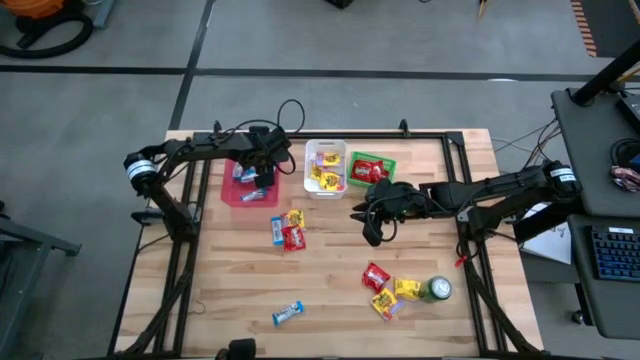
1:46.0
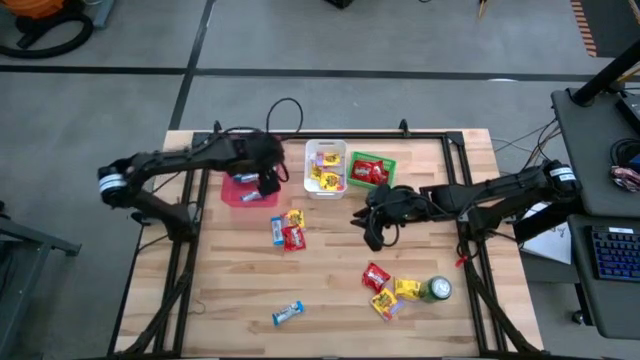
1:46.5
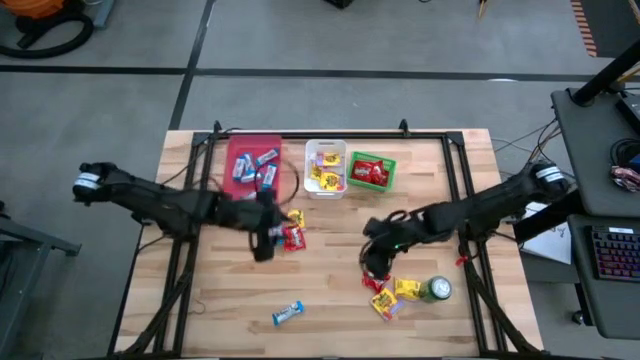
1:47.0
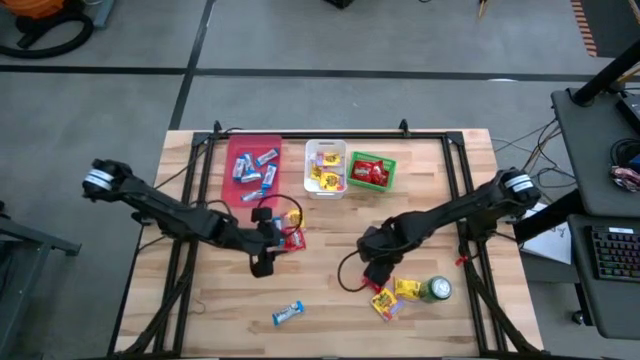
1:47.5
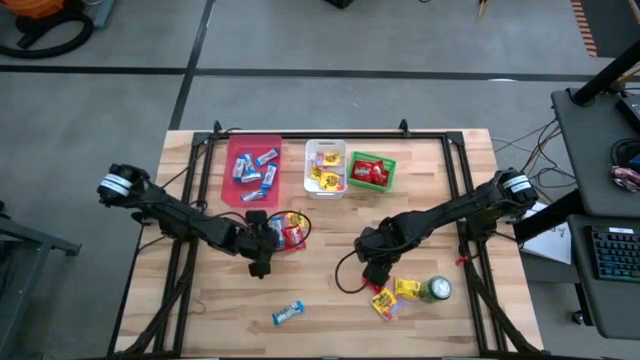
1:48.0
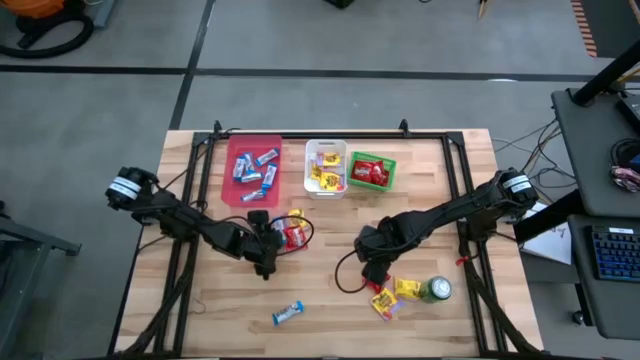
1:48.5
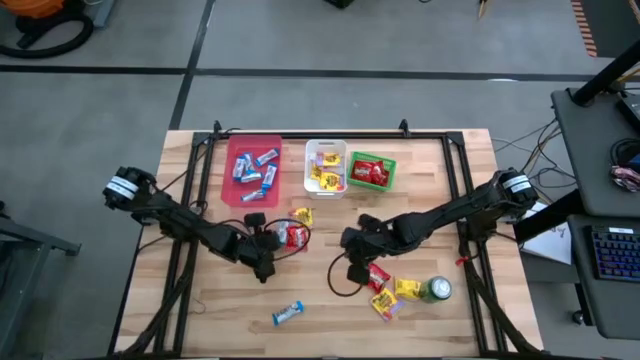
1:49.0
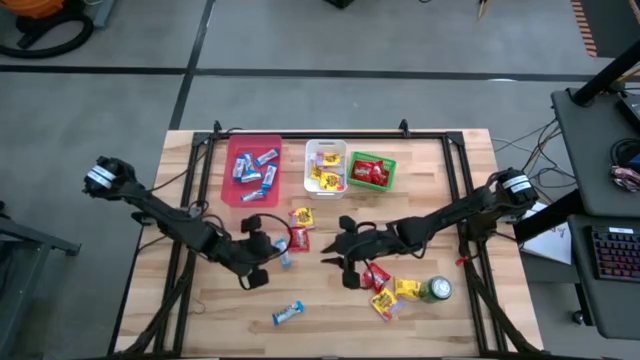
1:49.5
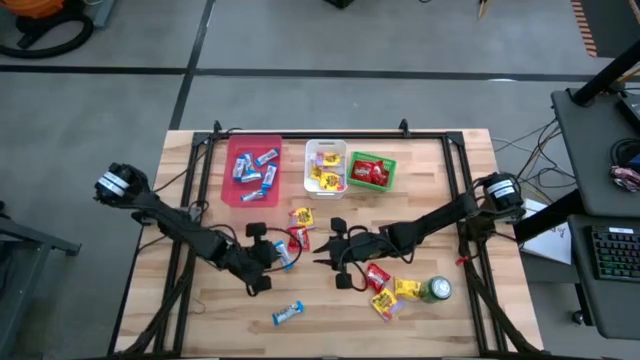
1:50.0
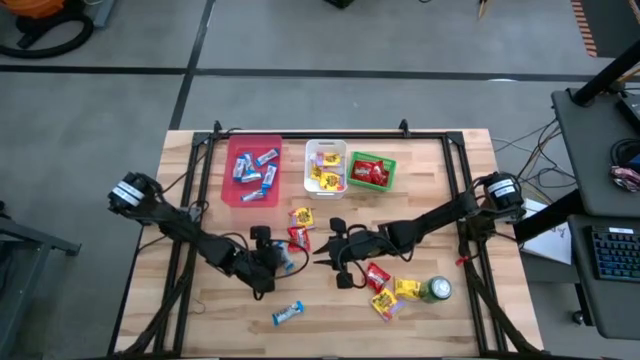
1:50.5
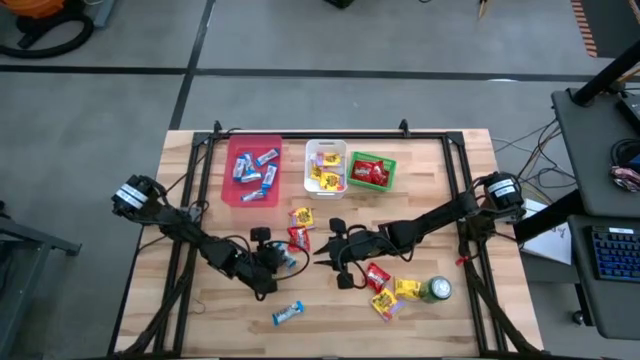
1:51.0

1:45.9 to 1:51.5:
Task: Sort candy
Put the white chocolate into the pink bin

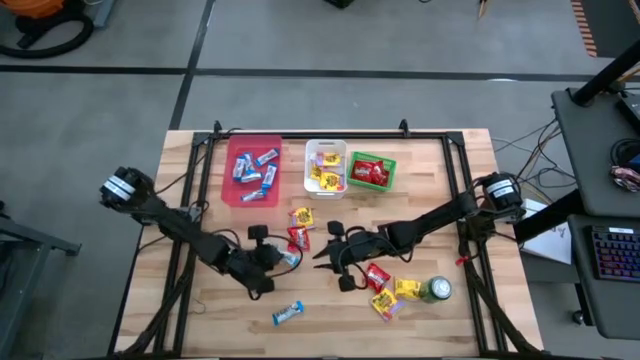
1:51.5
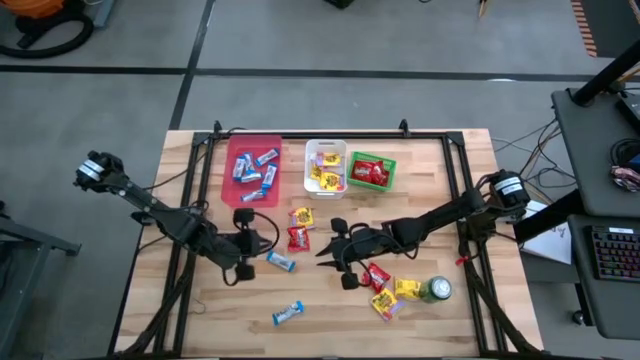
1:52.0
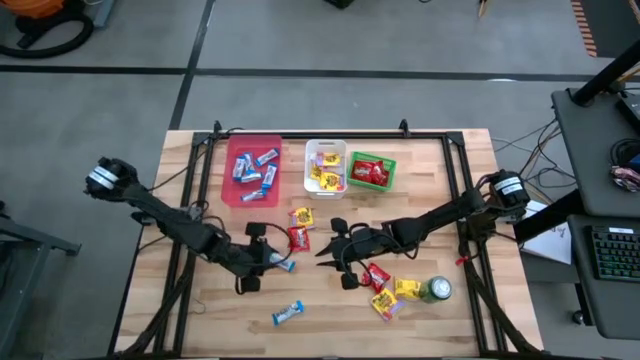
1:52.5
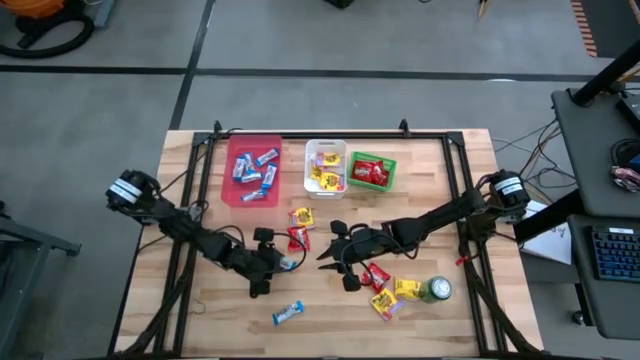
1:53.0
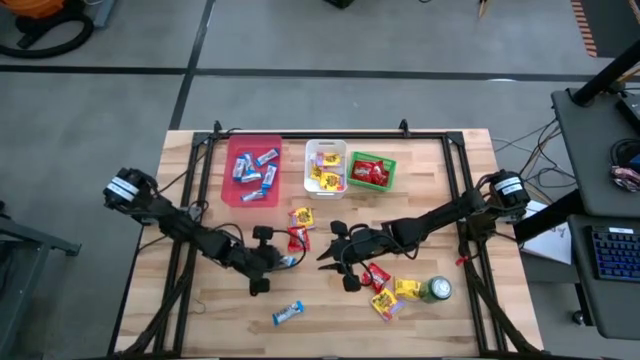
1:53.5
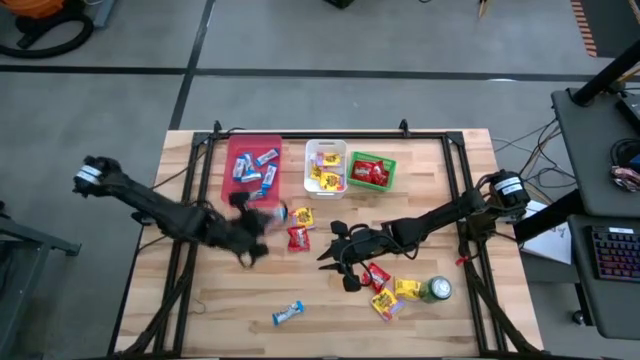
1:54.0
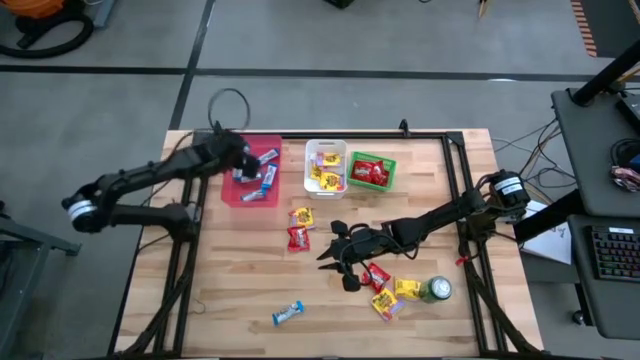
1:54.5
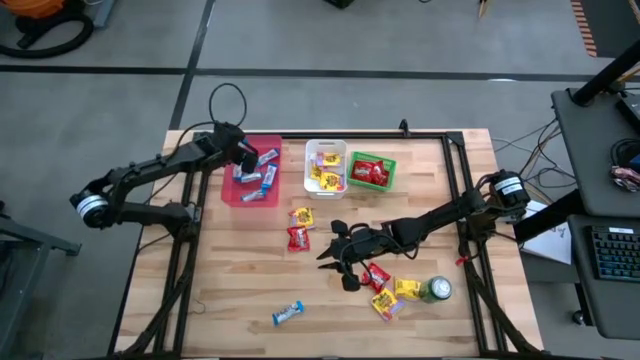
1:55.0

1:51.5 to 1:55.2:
Put the white chocolate into the pink bin

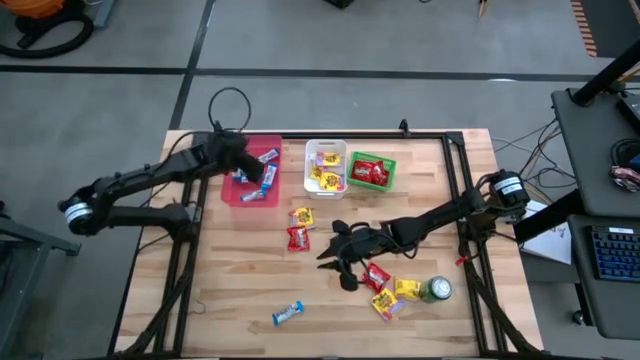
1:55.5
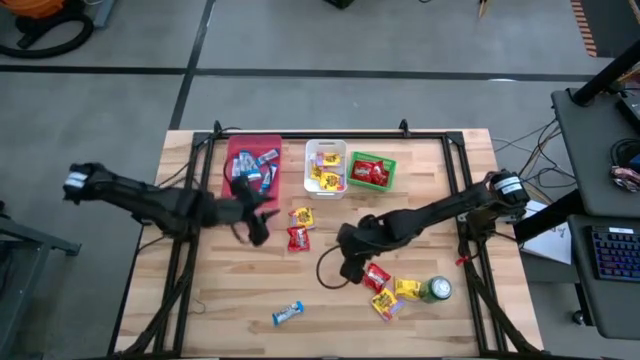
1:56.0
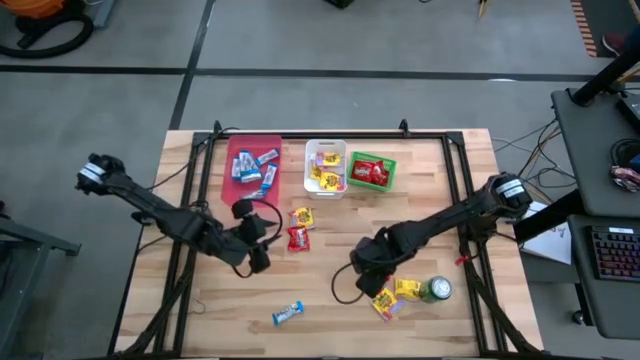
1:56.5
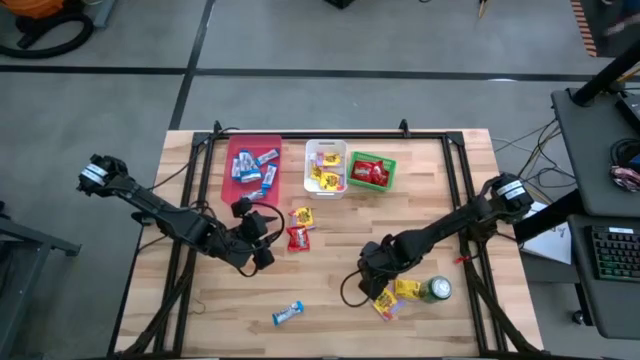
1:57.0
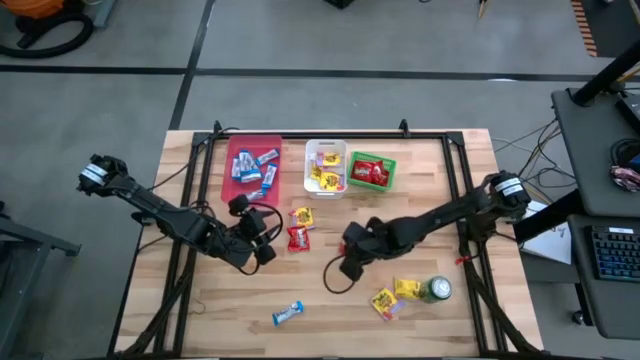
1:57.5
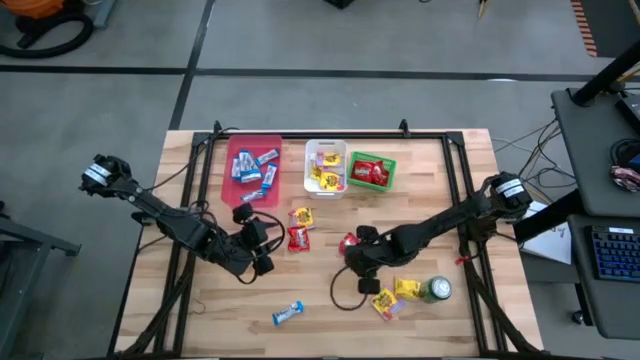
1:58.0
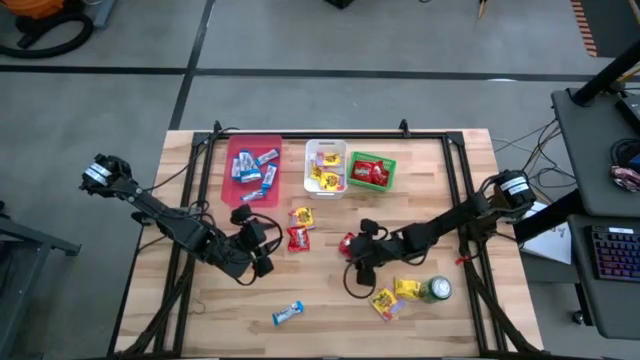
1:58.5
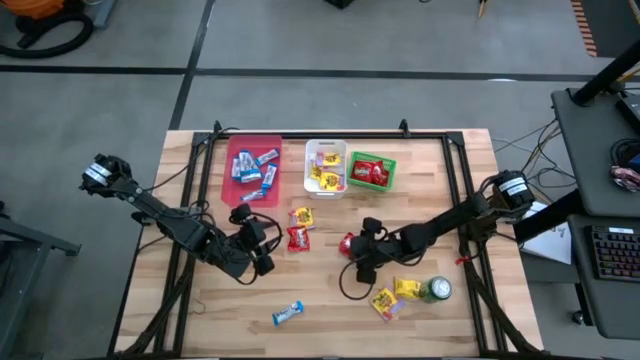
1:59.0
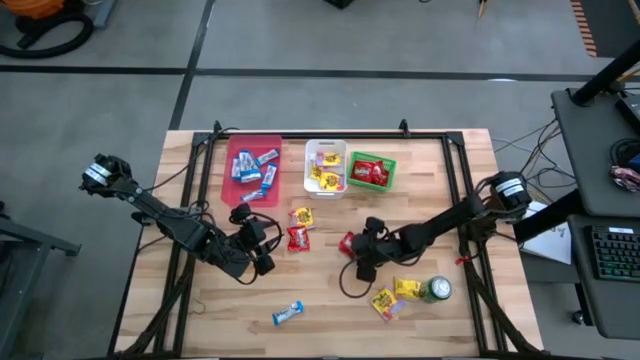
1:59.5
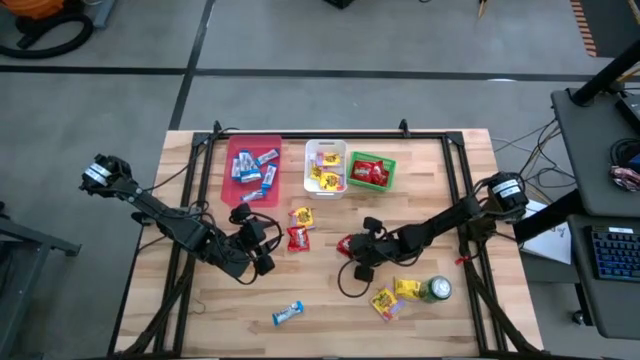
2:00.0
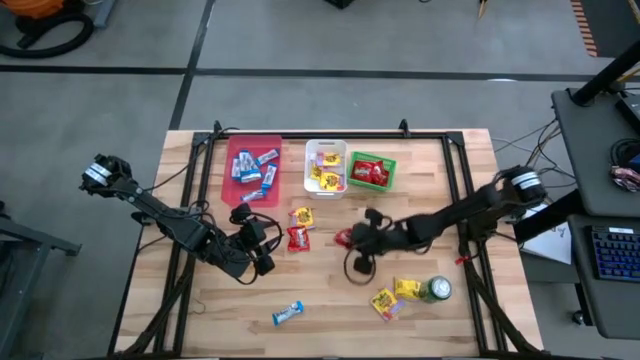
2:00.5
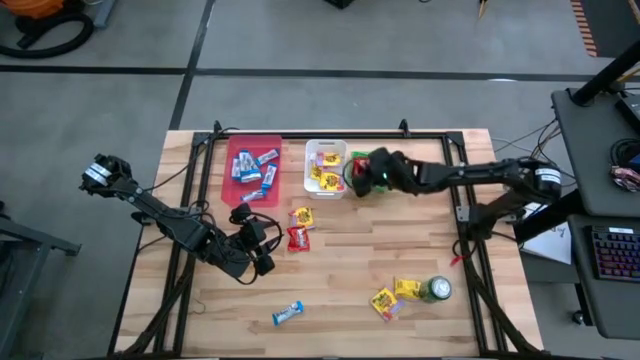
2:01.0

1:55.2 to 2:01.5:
Put the red candy into the green bin

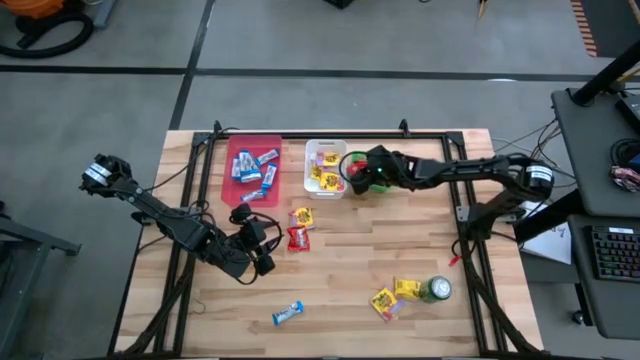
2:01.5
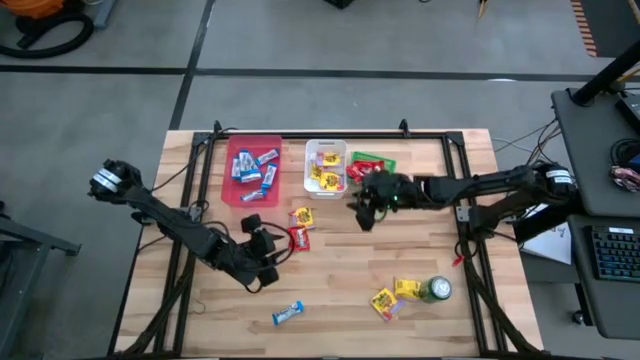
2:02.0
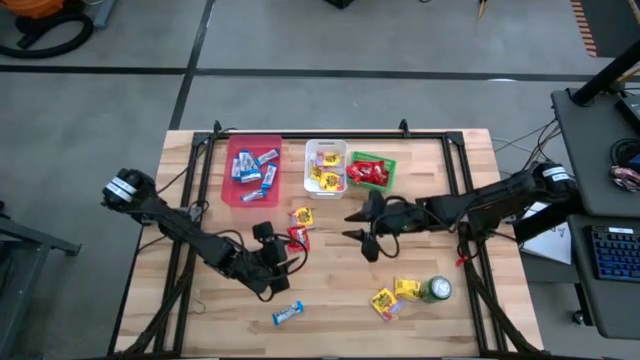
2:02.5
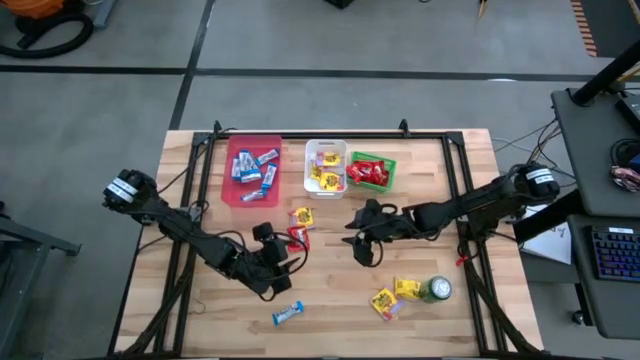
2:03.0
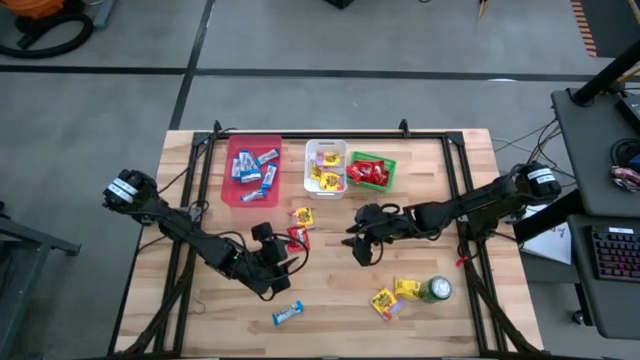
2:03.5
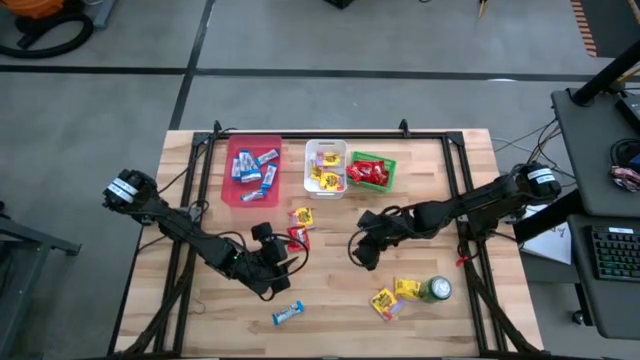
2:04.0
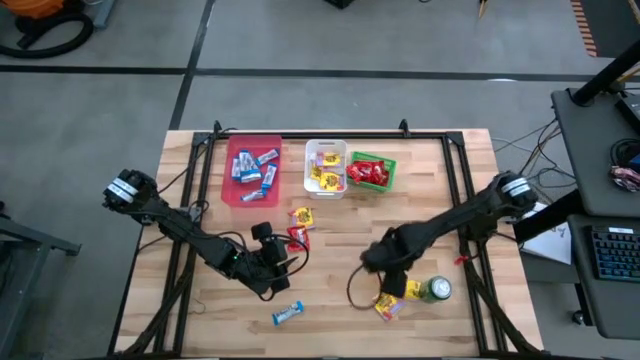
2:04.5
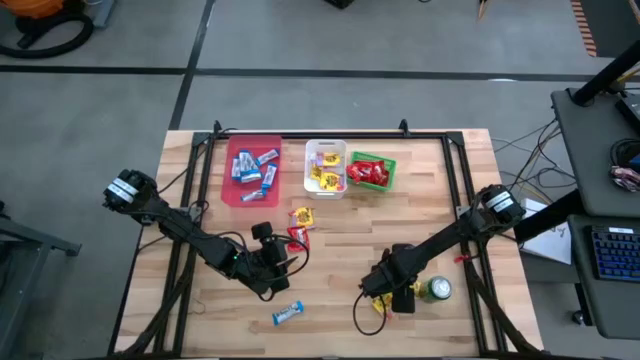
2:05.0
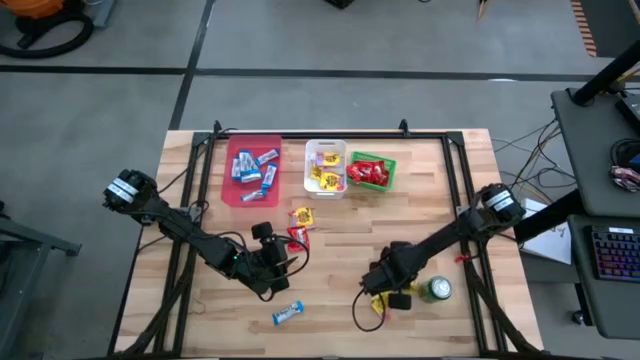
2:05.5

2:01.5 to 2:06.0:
Put the yellow candy into the white bin

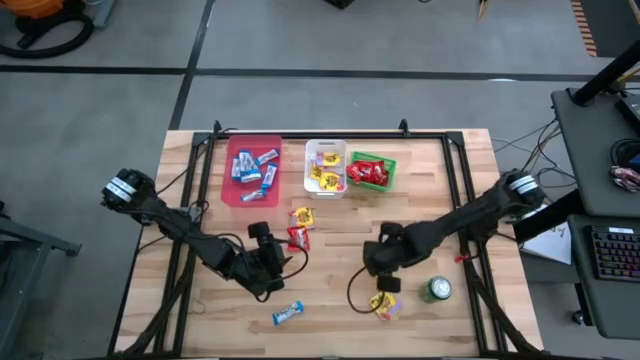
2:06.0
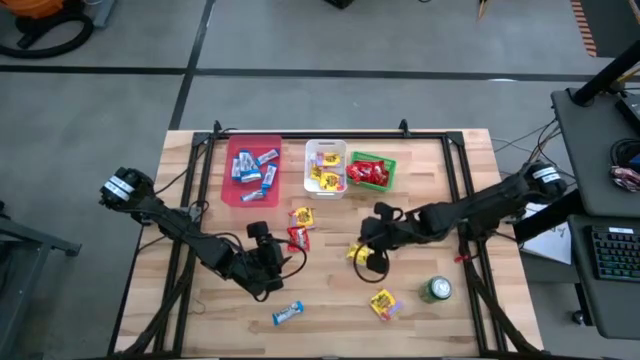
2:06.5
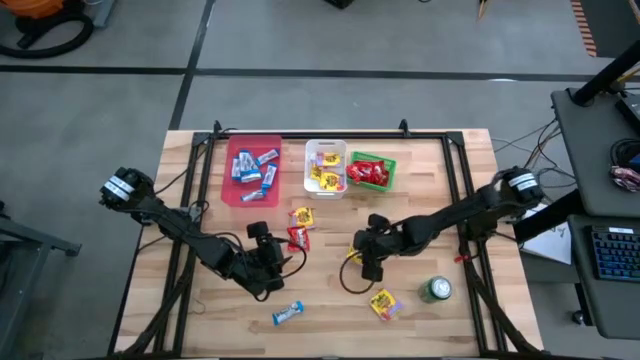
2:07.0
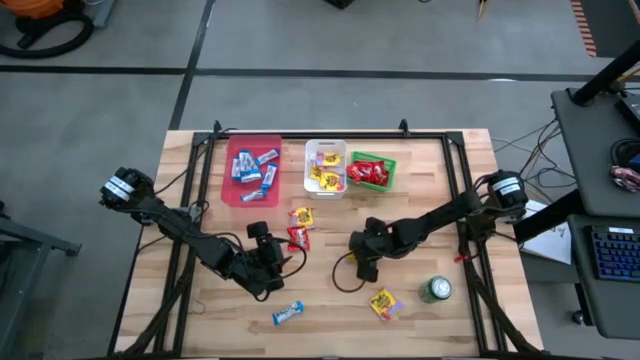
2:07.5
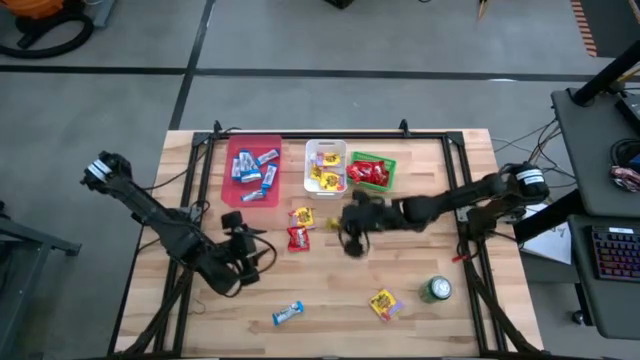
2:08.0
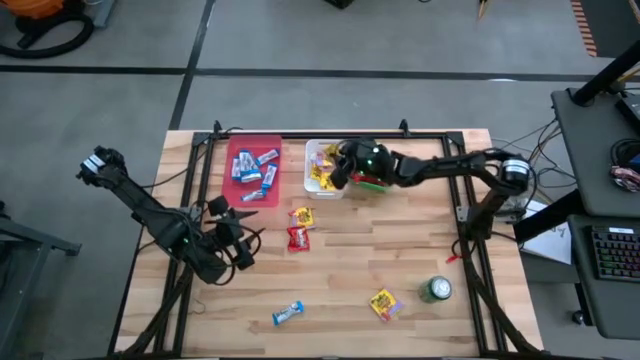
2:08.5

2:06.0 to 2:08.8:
Put the yellow candy into the white bin
